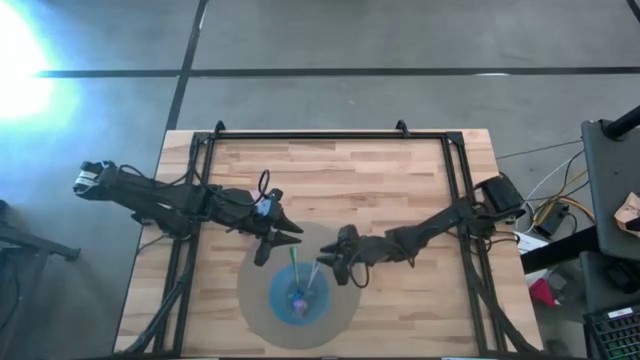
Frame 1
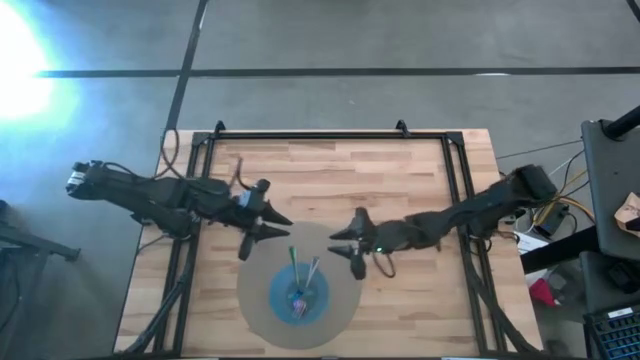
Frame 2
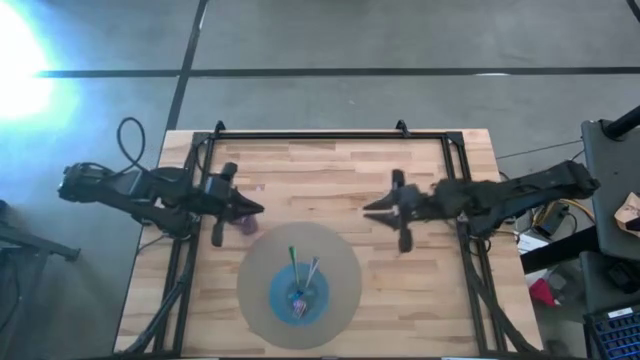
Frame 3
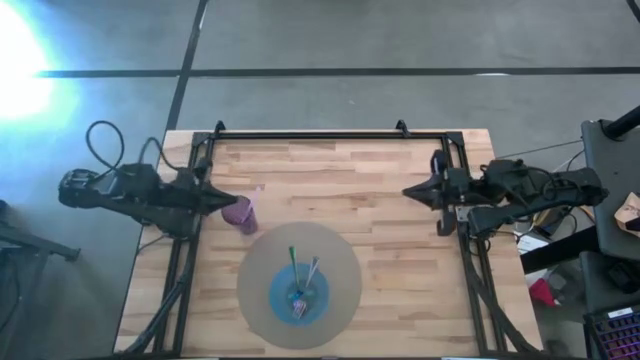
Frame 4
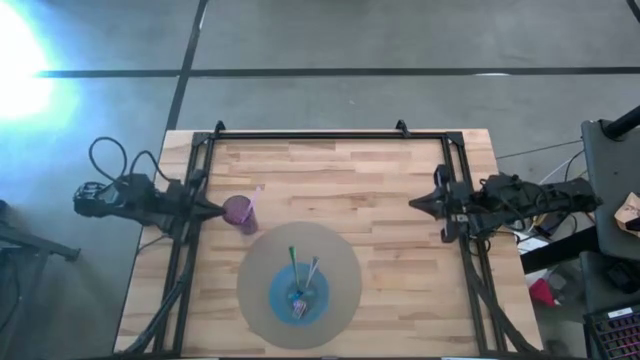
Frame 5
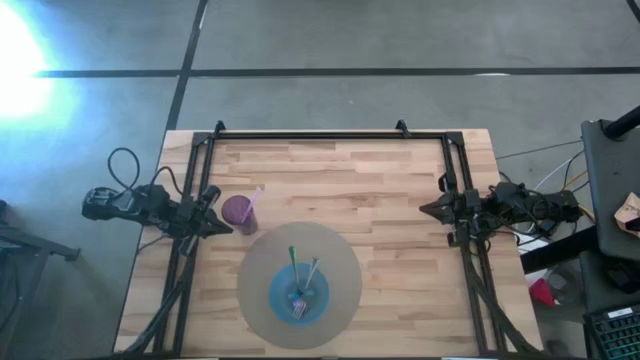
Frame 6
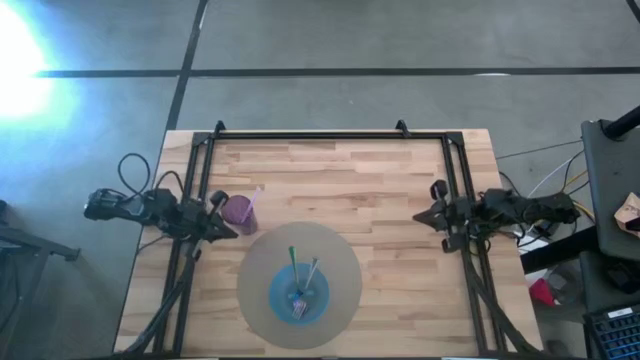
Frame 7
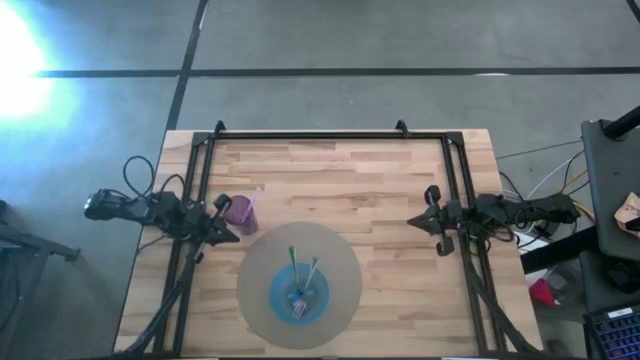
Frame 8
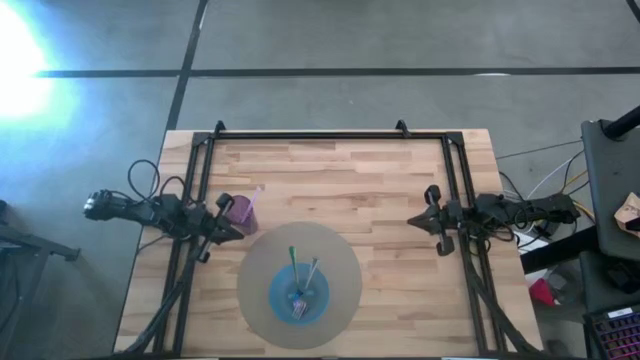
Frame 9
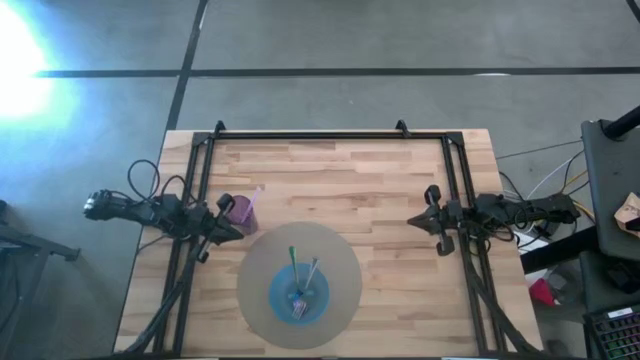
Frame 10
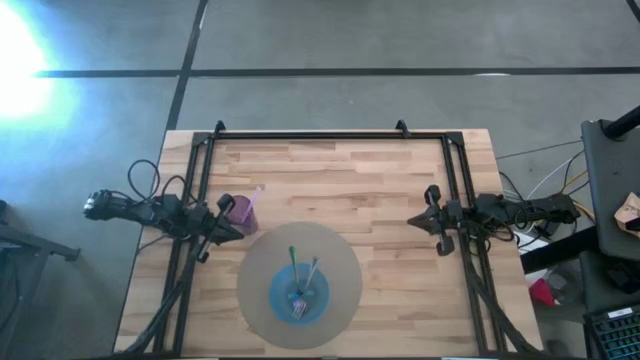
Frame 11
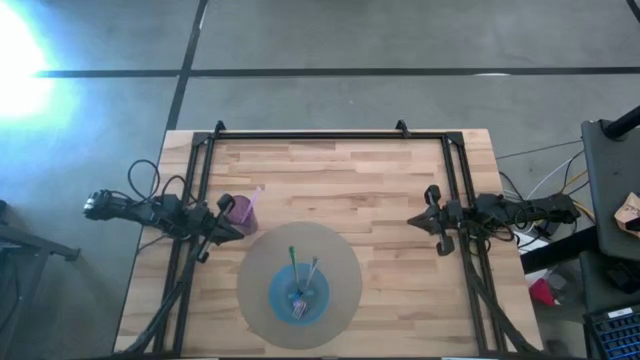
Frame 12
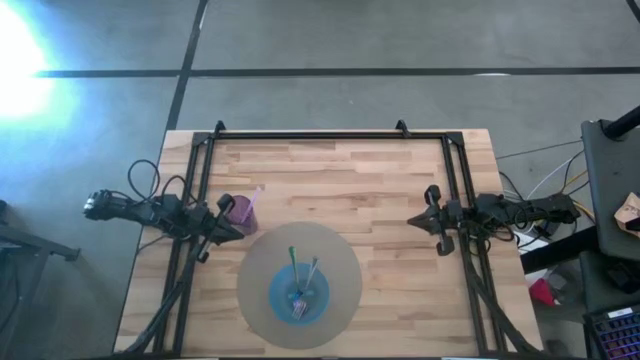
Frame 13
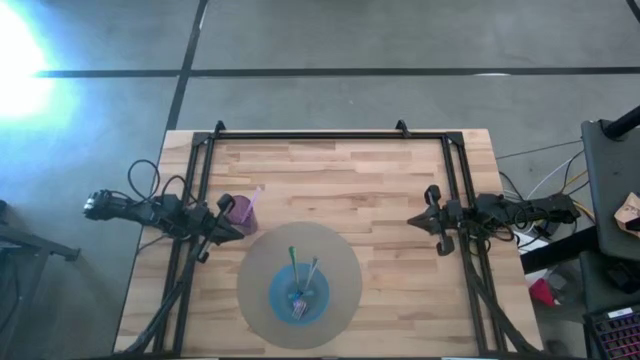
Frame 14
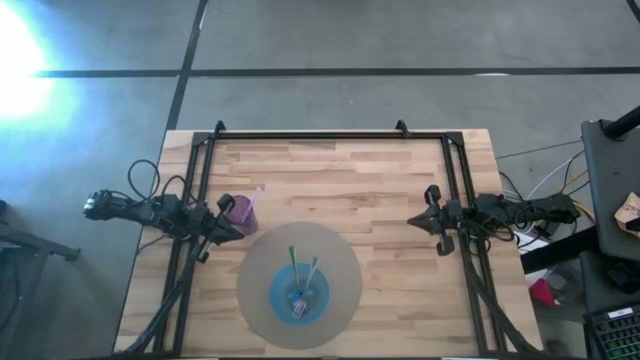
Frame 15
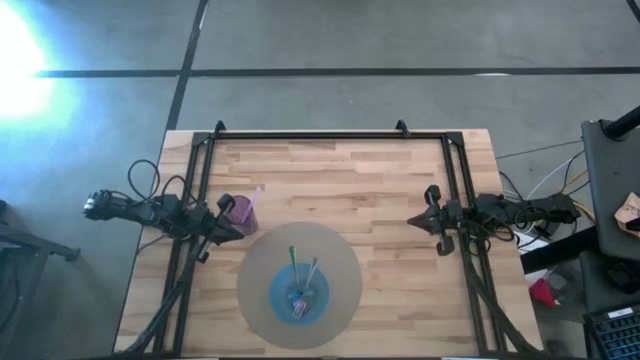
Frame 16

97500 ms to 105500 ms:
Task: Pick & Place Utensil
Return to Home Position

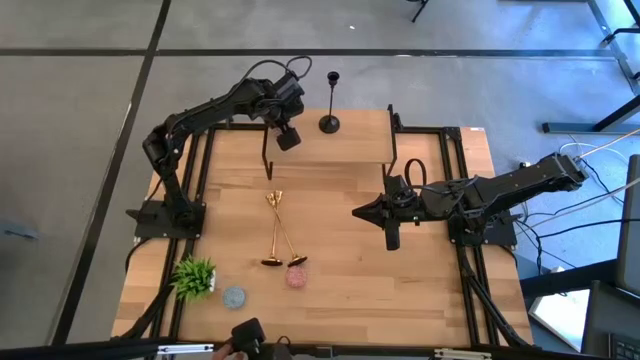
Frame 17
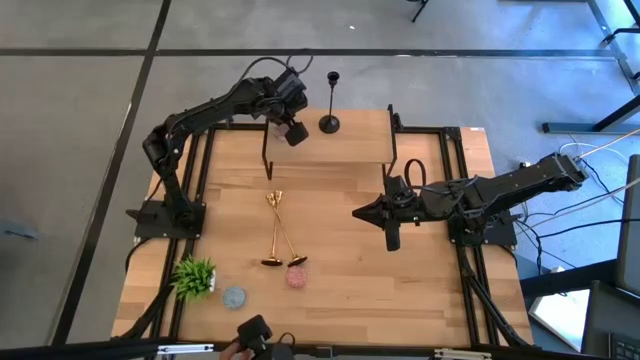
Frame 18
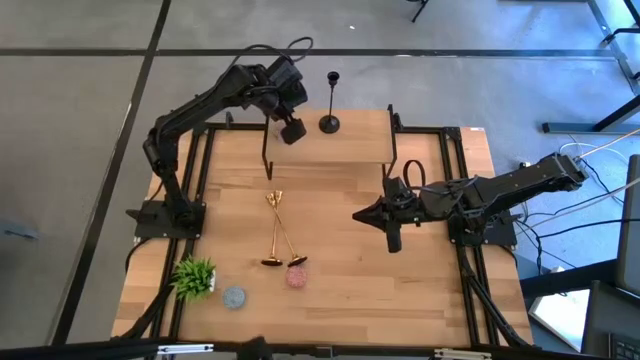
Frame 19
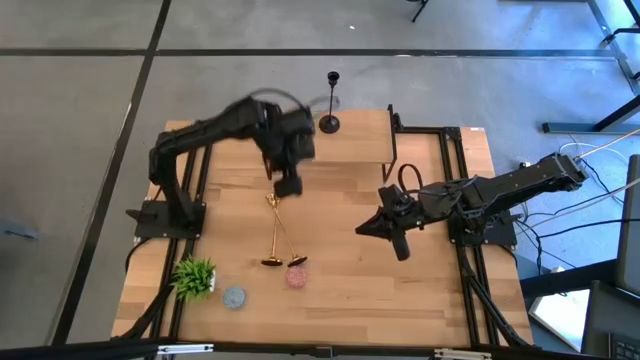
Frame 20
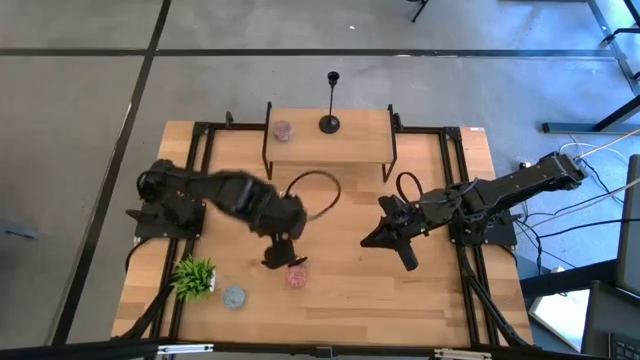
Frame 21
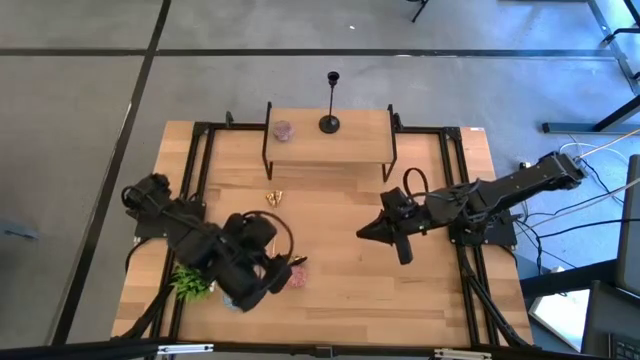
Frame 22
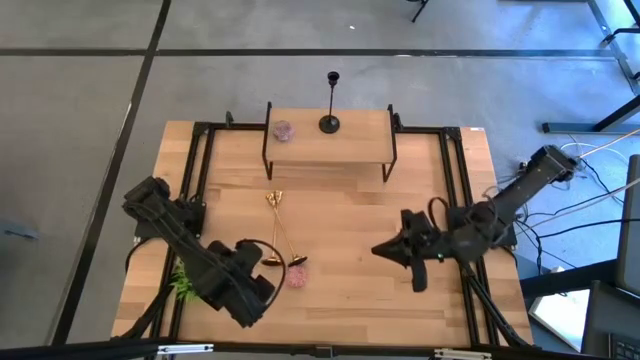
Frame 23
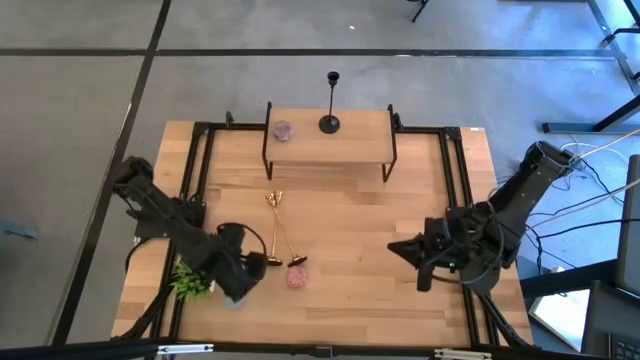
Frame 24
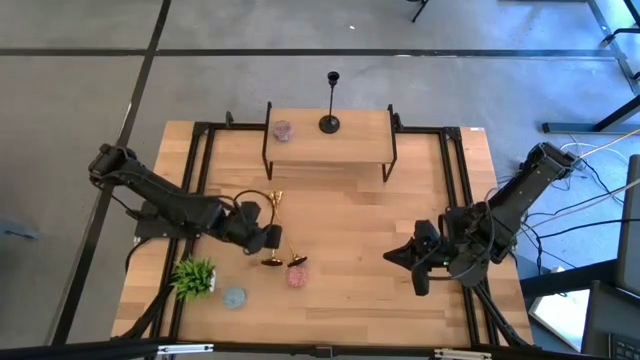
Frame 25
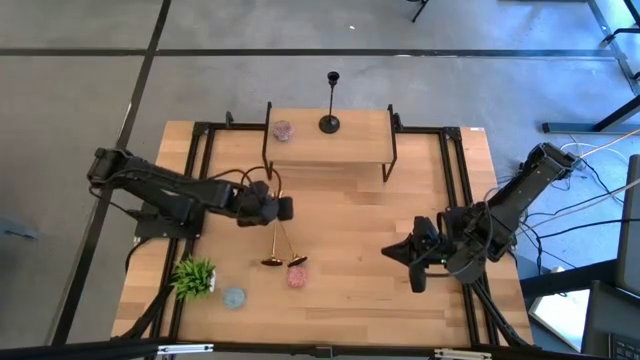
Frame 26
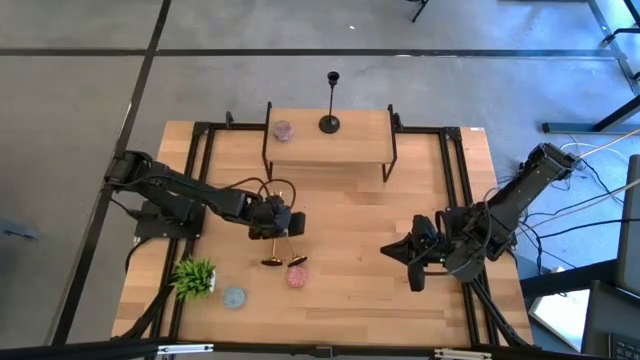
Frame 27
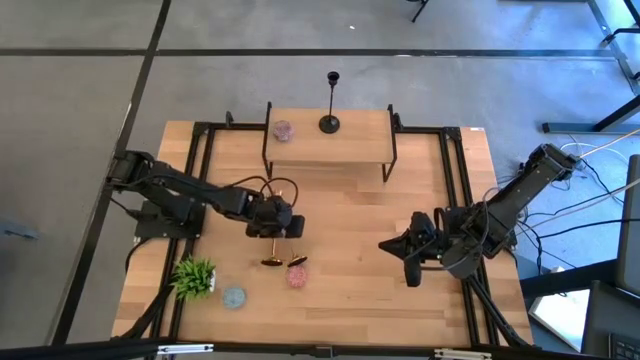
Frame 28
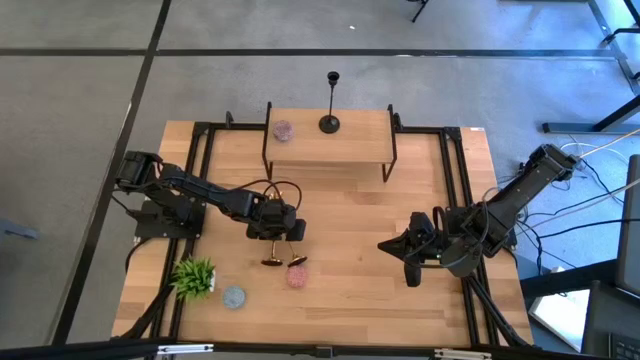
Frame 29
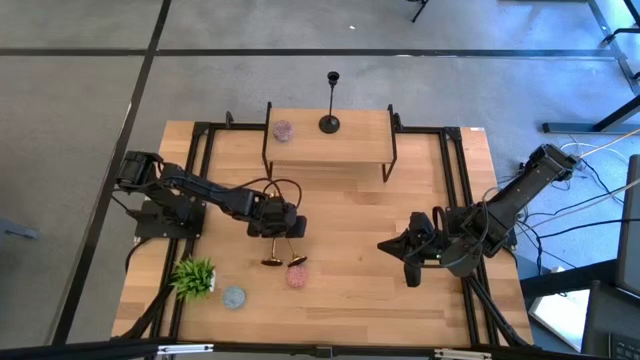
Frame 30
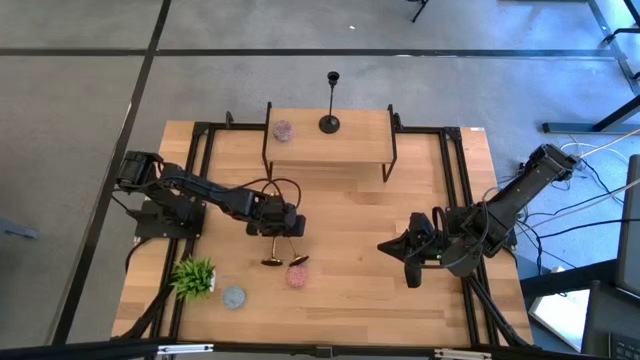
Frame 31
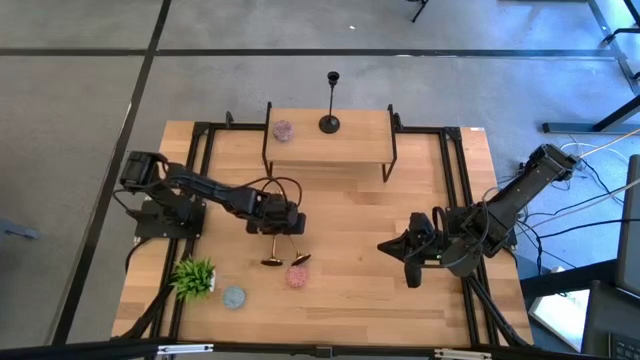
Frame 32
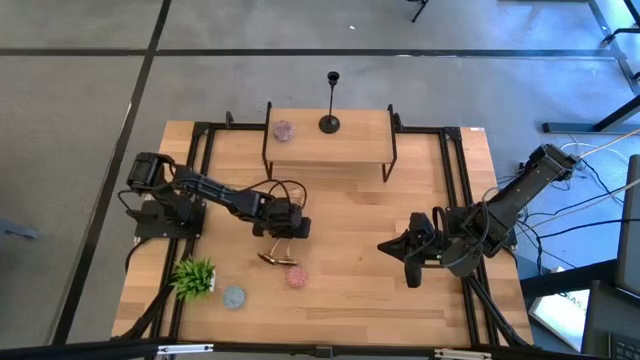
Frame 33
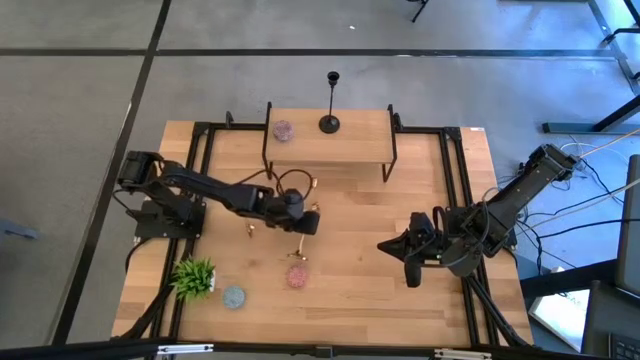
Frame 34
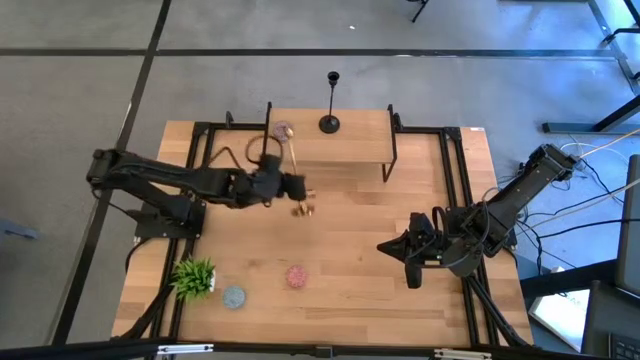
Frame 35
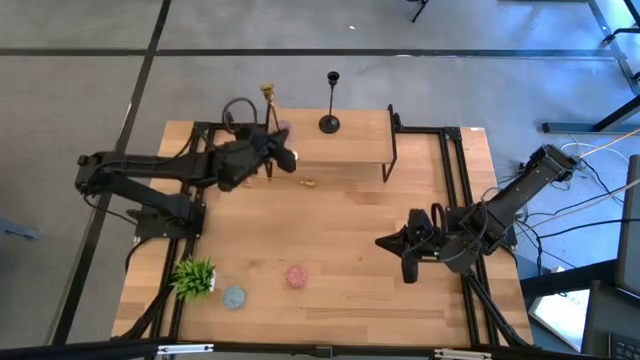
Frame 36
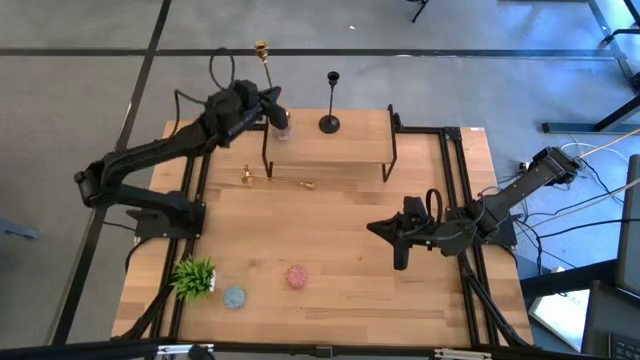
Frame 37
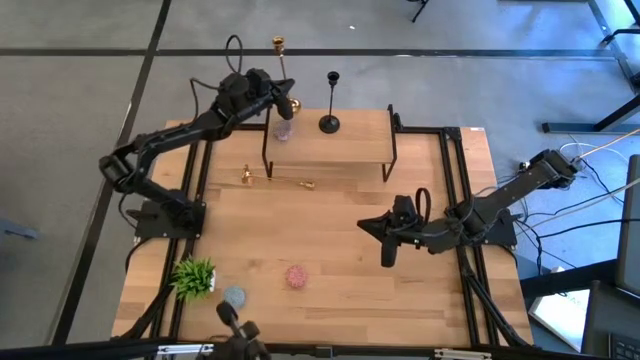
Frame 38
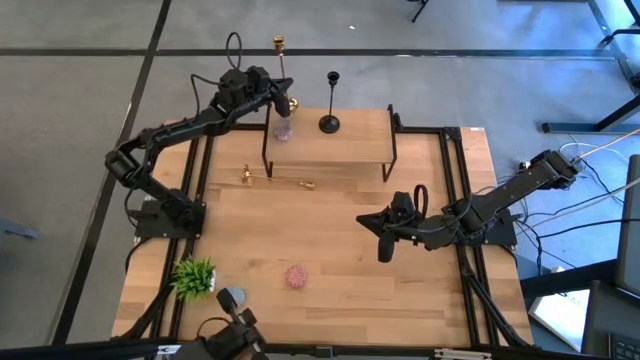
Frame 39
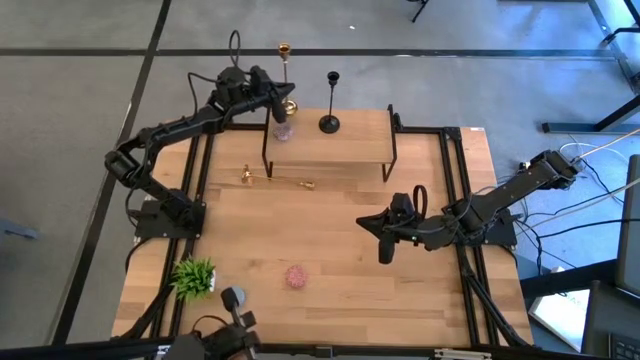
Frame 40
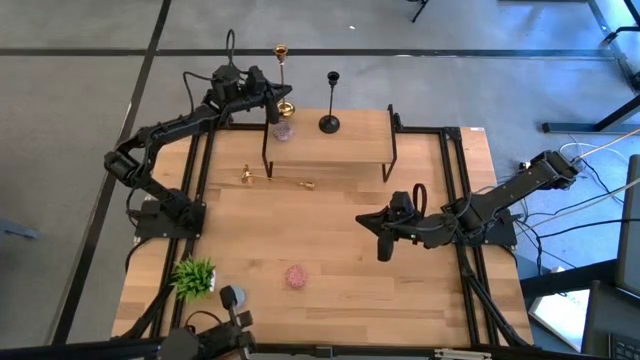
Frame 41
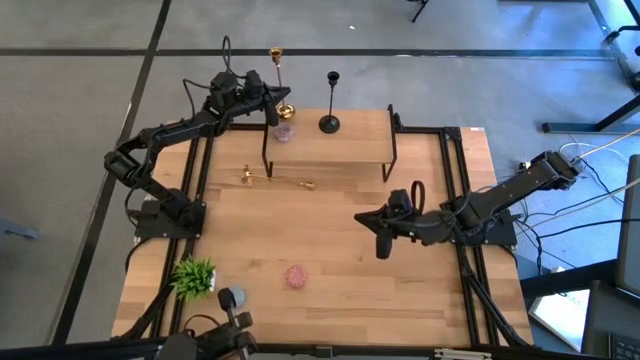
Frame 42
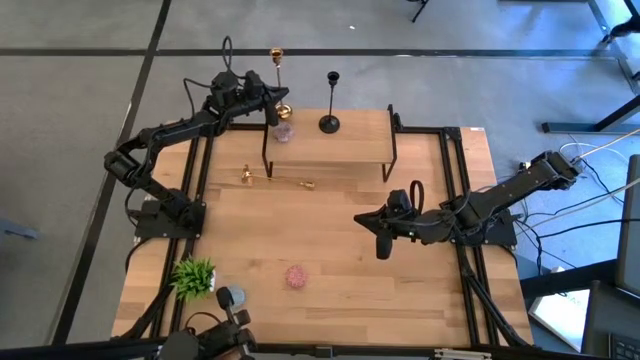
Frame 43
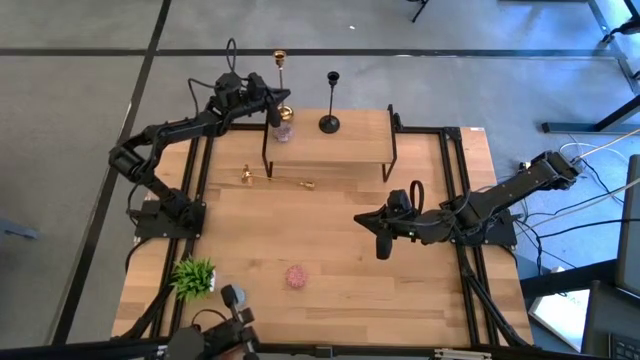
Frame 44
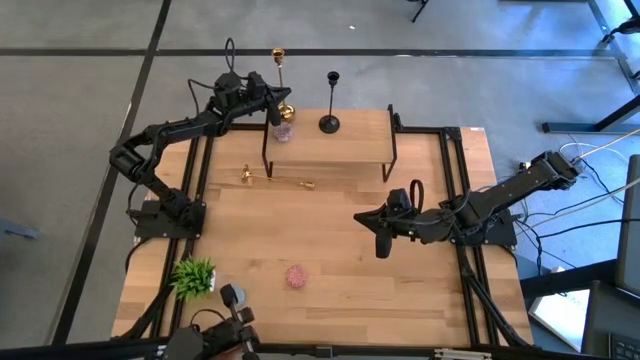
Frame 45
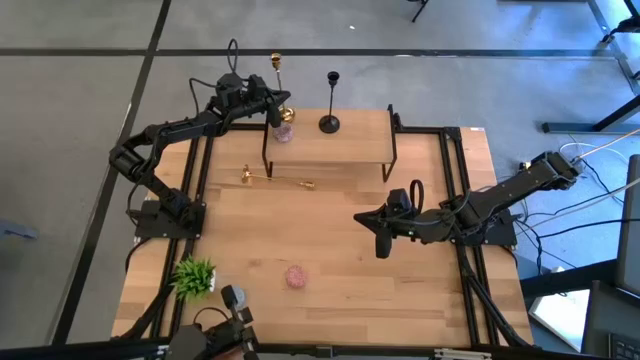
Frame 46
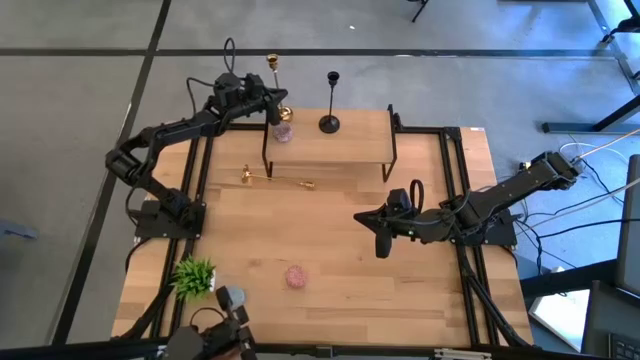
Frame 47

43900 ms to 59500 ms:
Task: Pick & Place candle stick holders
Put the right gold candle holder on the shelf
